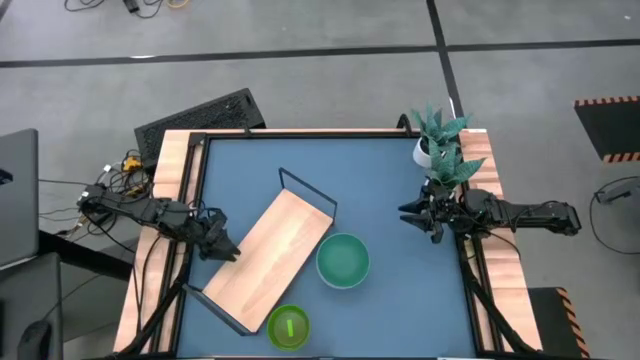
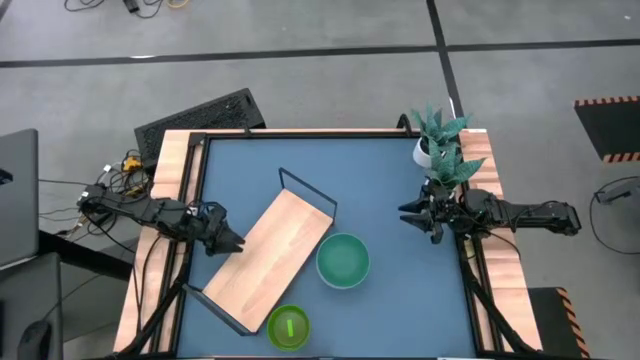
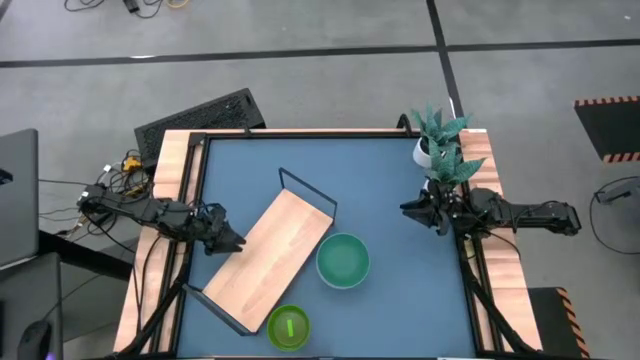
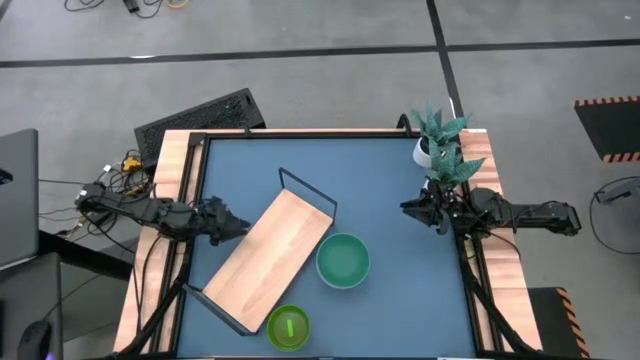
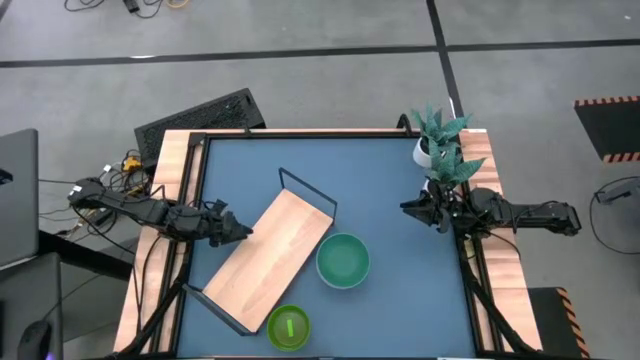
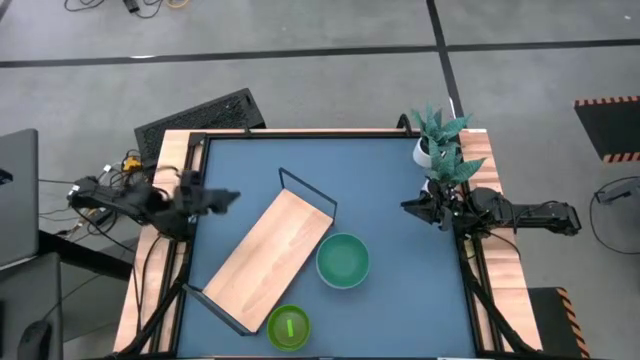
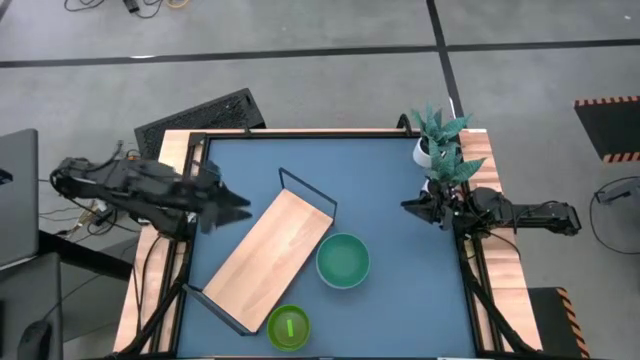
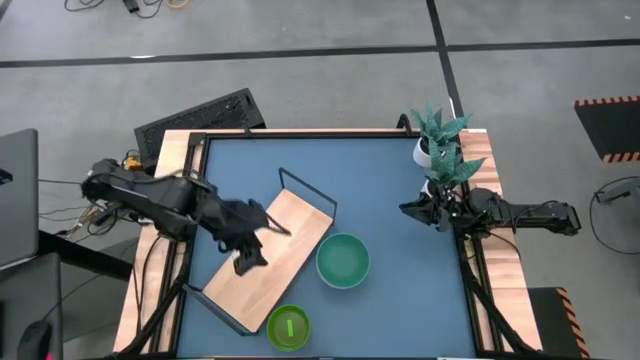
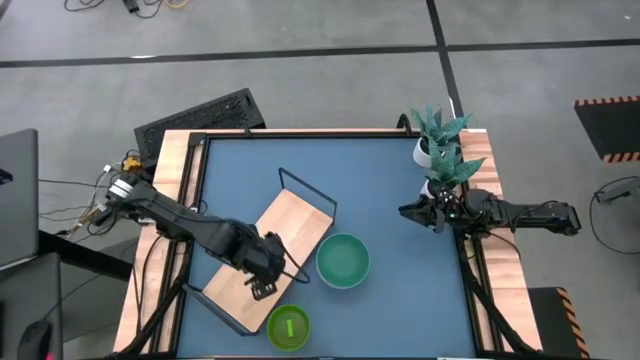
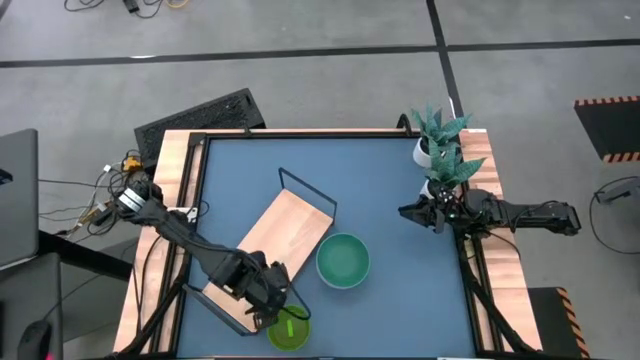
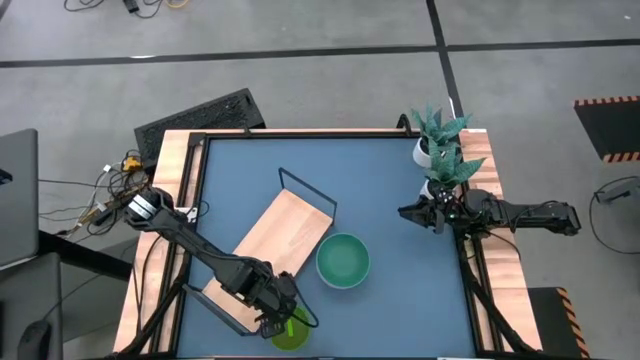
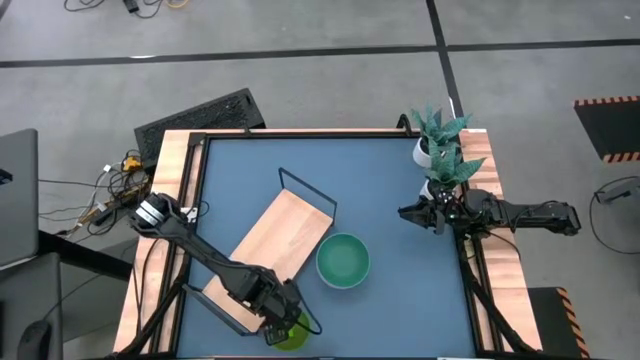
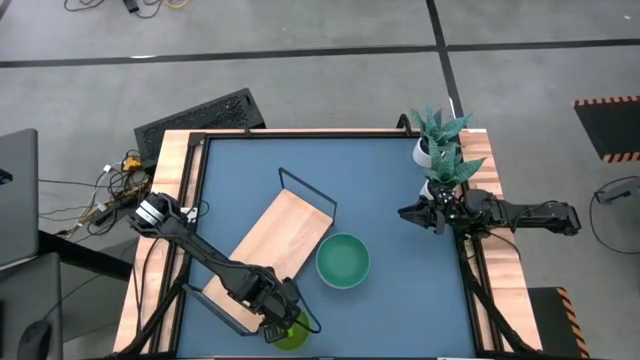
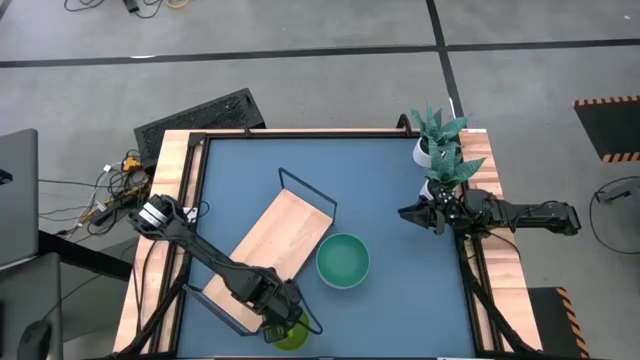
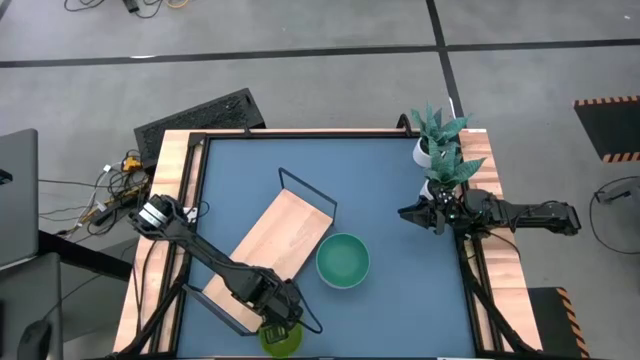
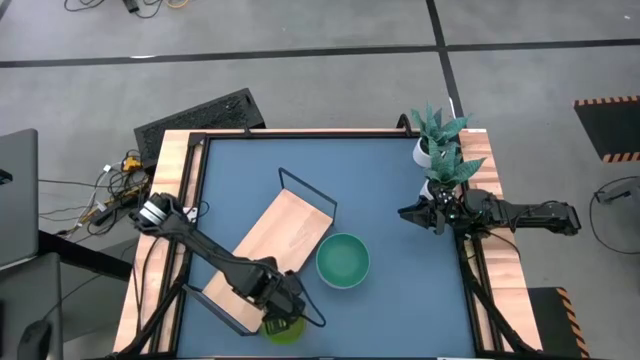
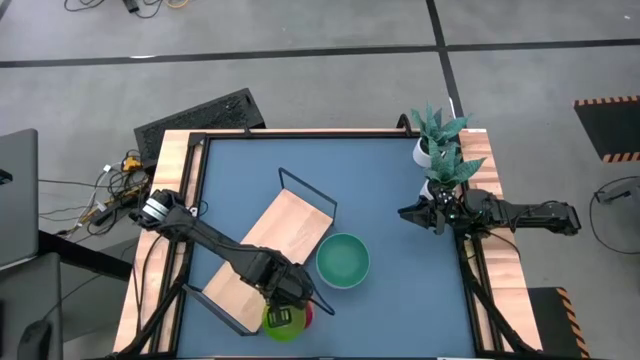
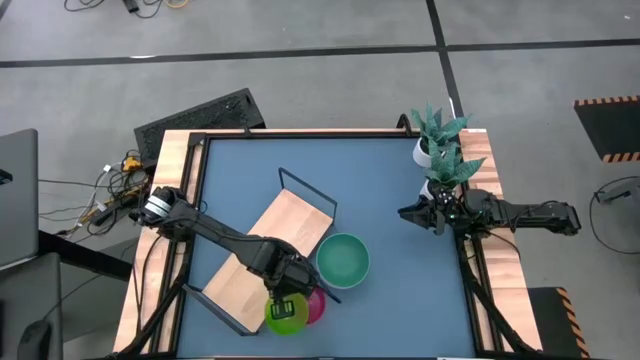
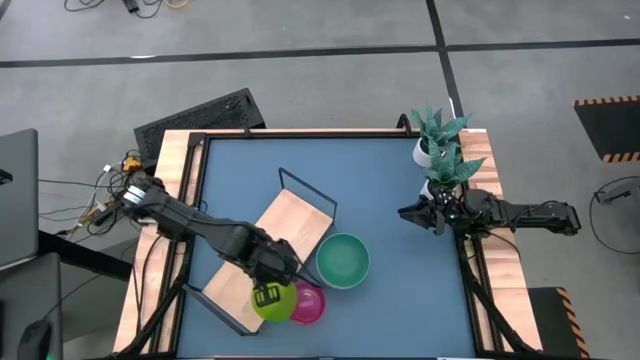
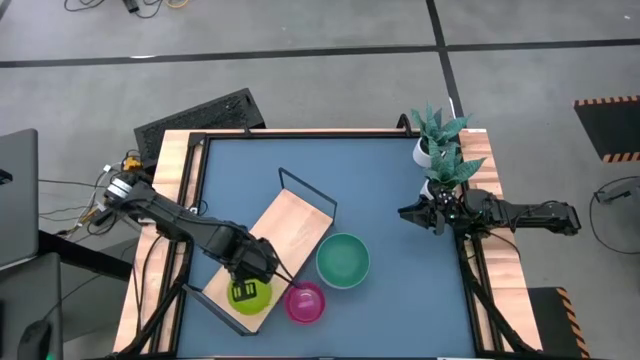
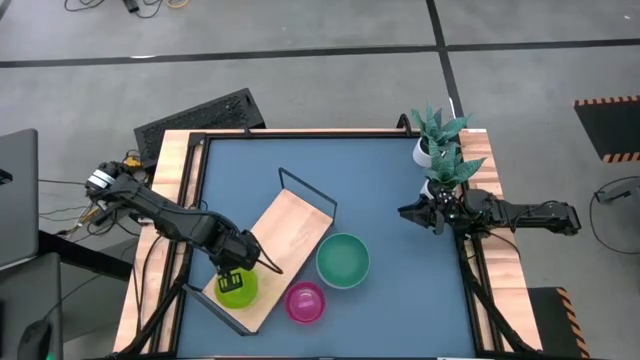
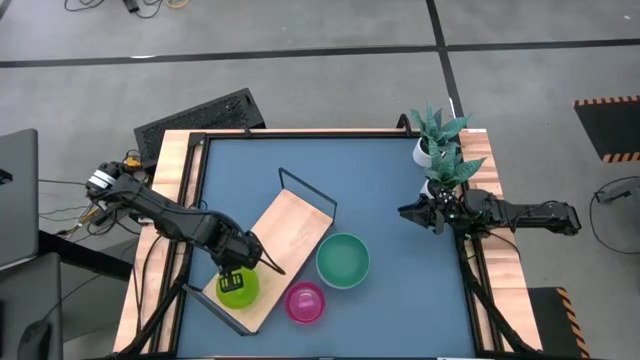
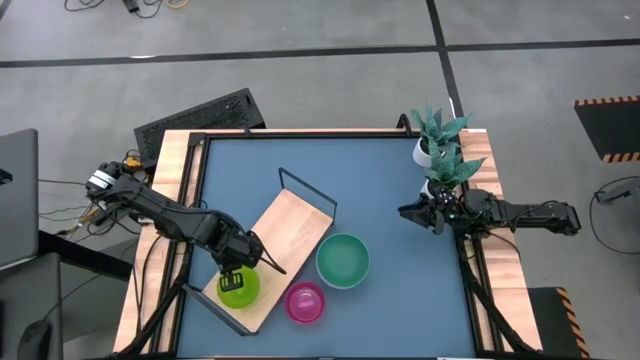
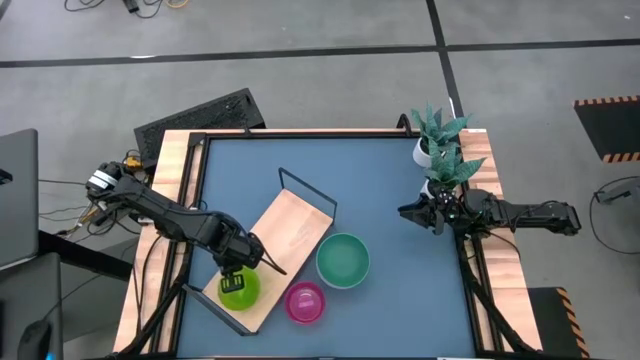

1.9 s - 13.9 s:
Task: Place and stack bowls onto a shelf
Put the small green bowl on the shelf

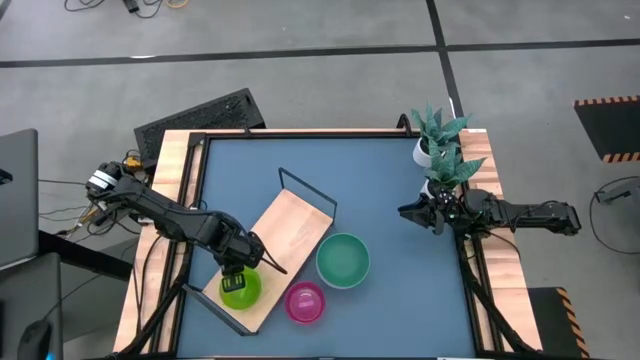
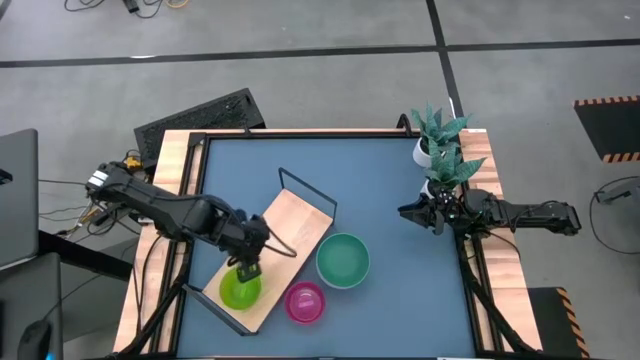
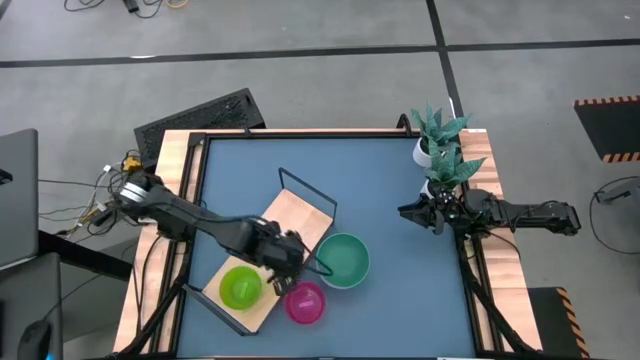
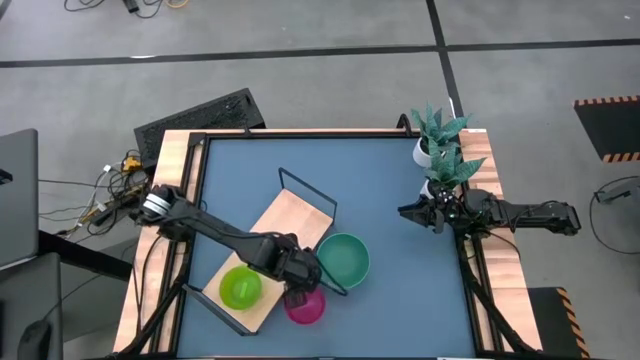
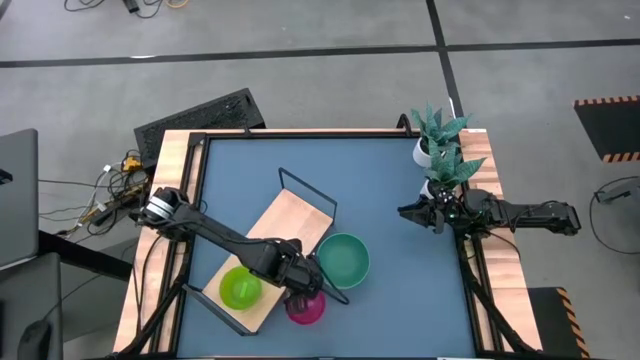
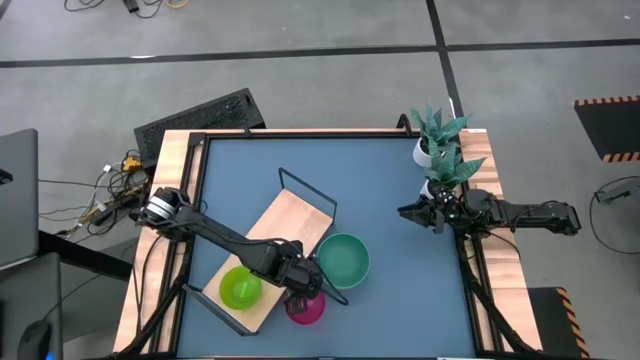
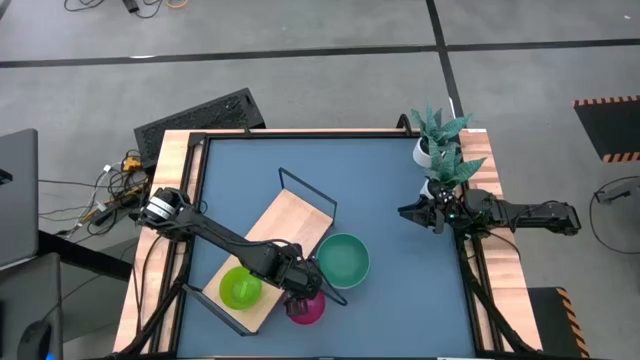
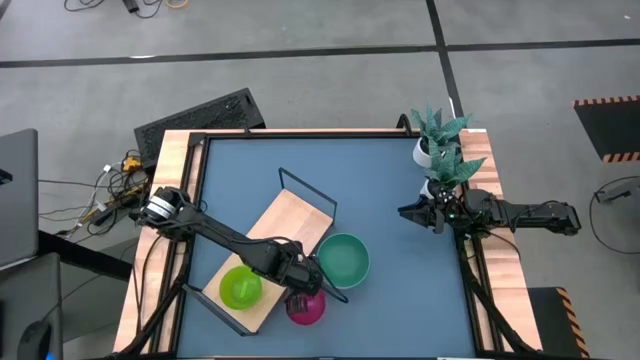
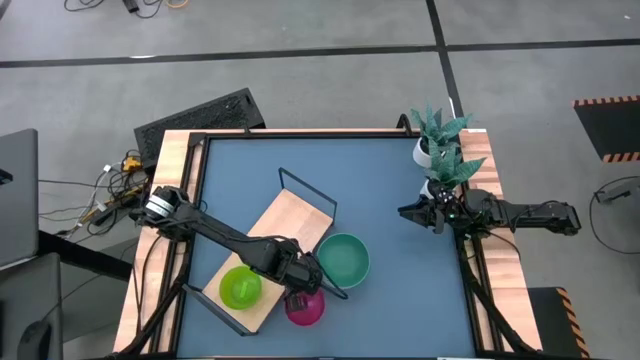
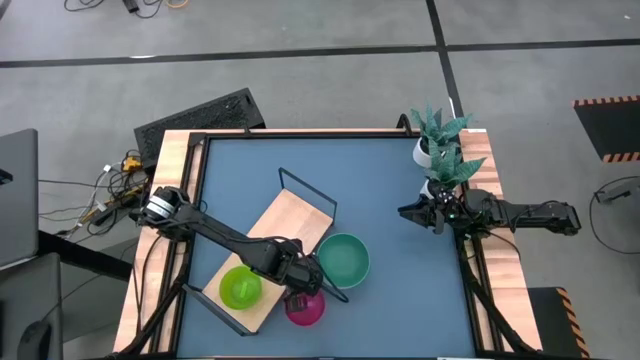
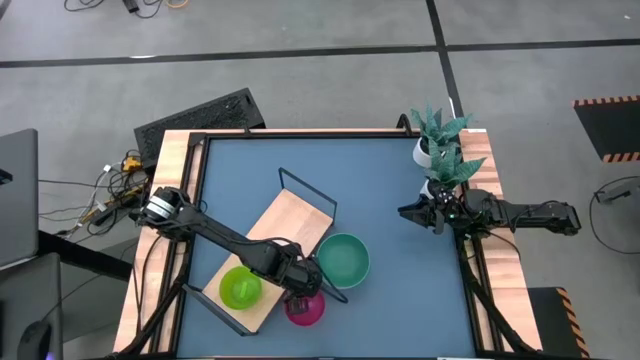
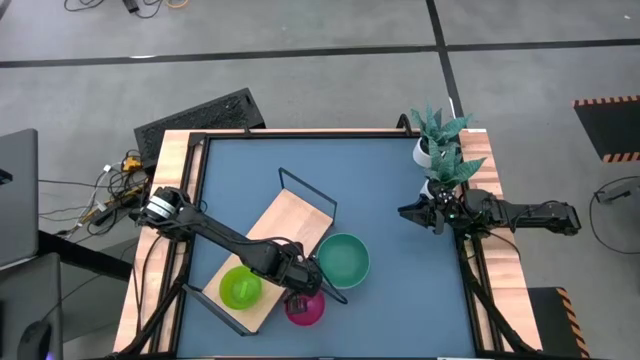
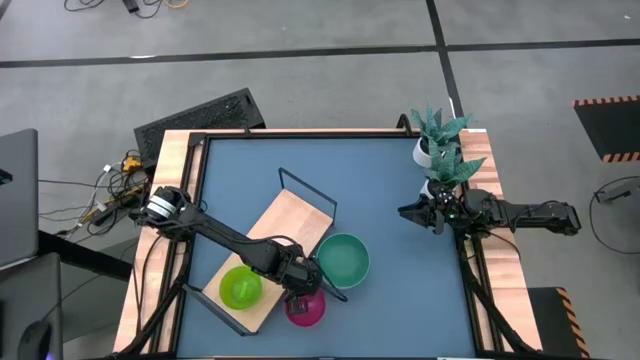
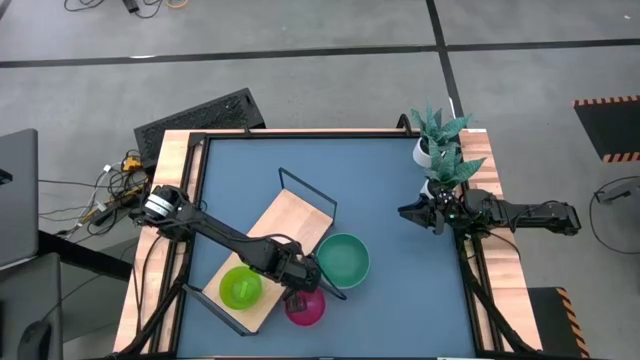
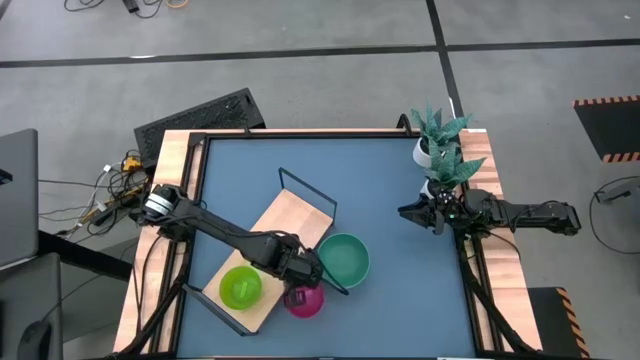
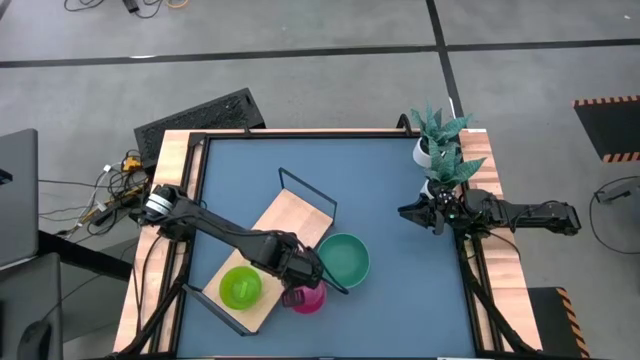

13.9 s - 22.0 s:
Stack the small violet bowl on top of the green bowl on the shelf
